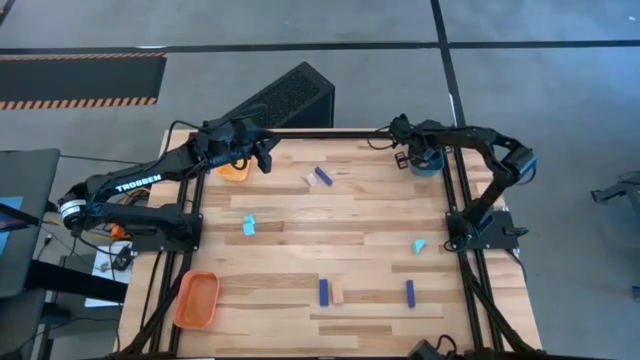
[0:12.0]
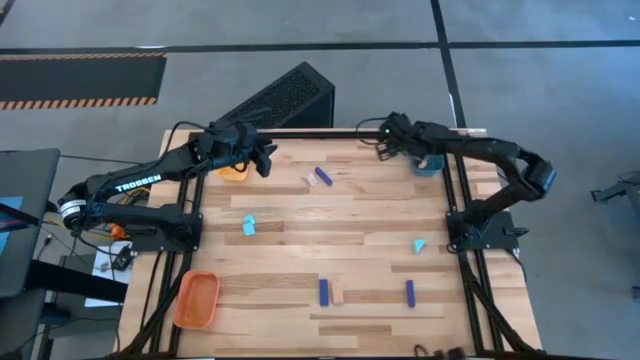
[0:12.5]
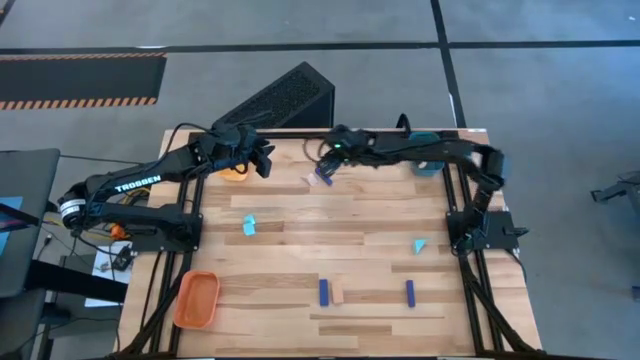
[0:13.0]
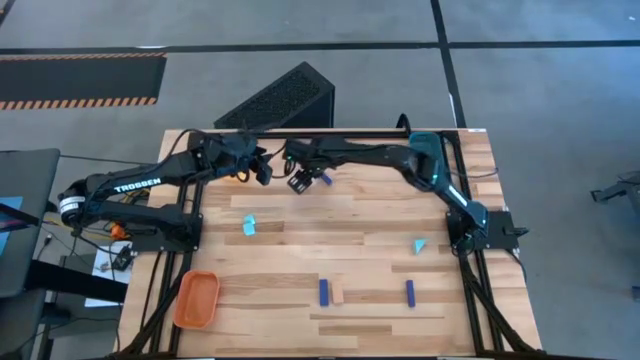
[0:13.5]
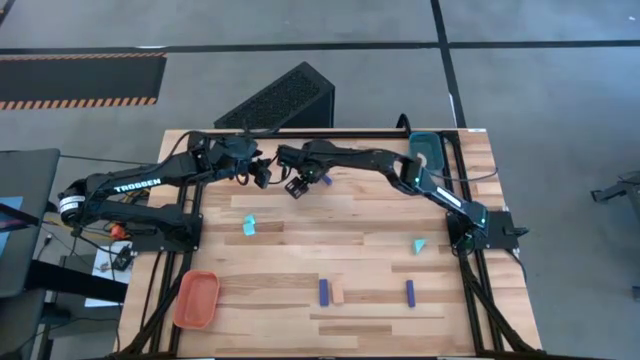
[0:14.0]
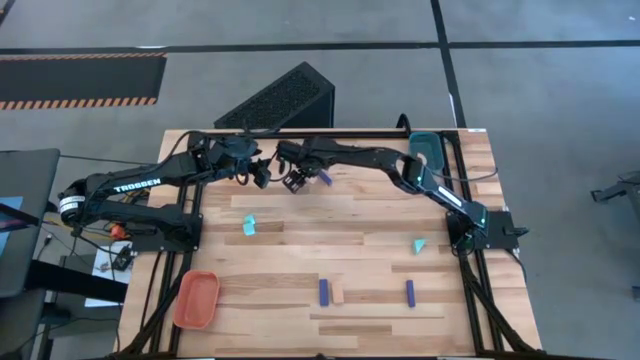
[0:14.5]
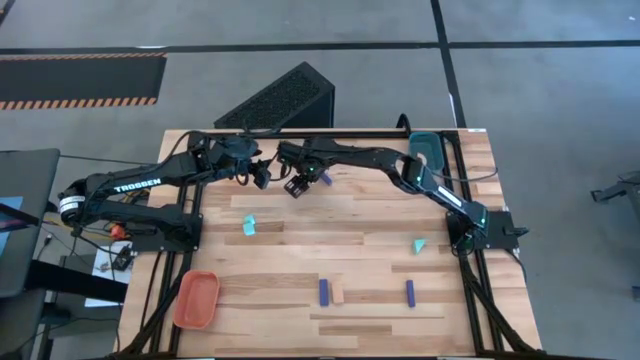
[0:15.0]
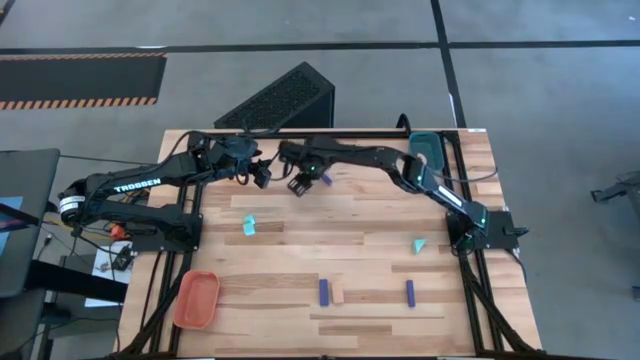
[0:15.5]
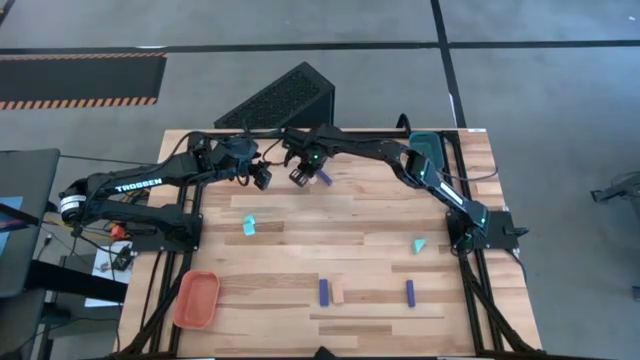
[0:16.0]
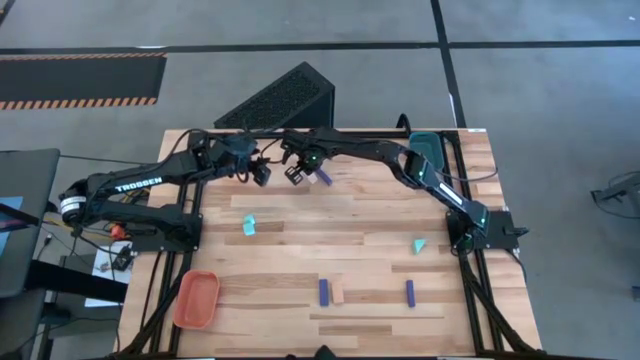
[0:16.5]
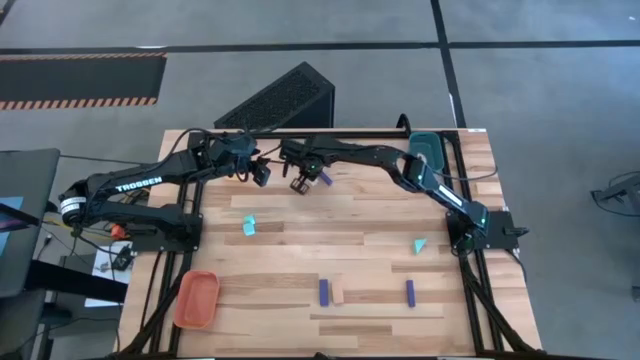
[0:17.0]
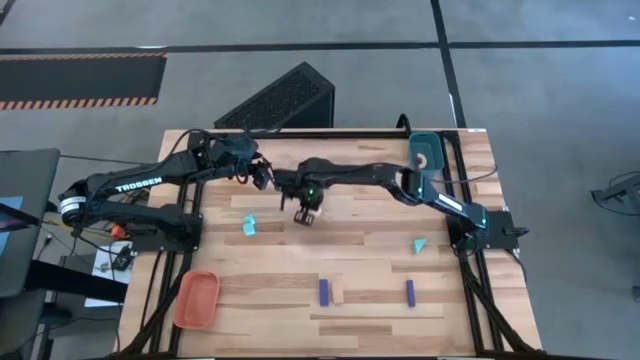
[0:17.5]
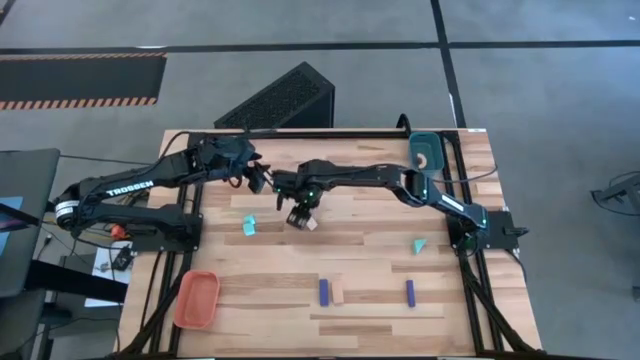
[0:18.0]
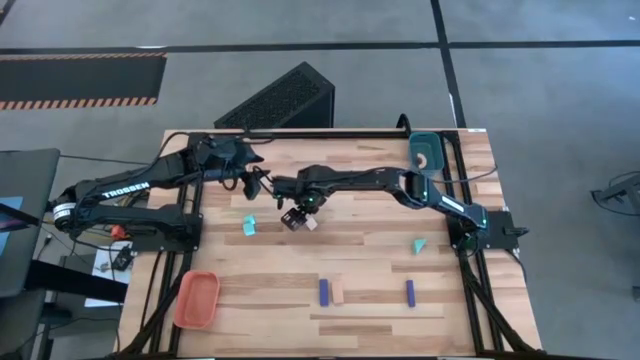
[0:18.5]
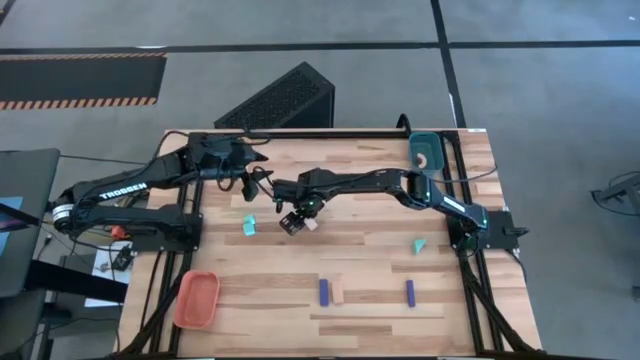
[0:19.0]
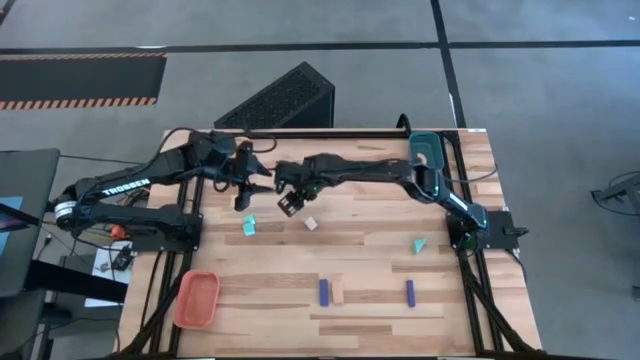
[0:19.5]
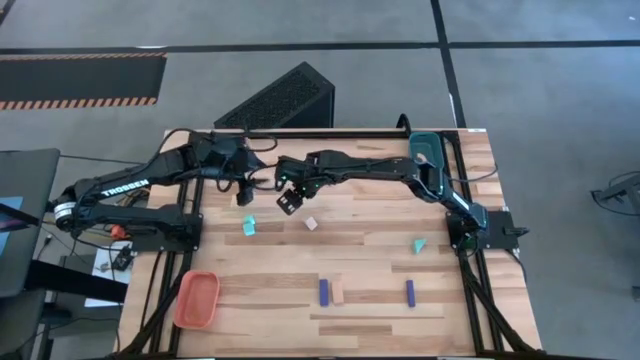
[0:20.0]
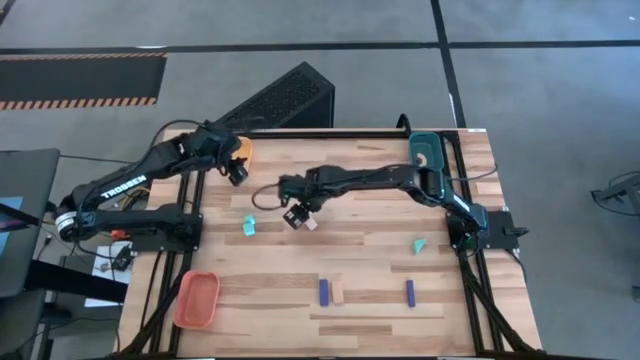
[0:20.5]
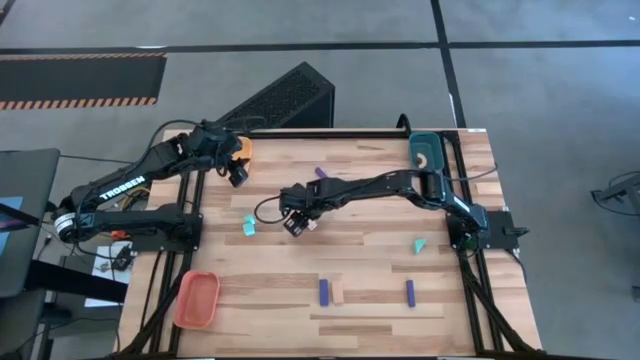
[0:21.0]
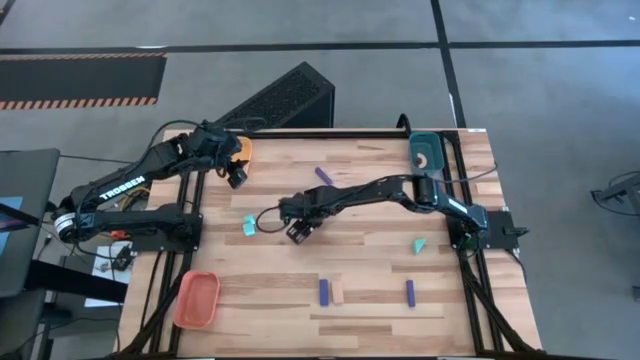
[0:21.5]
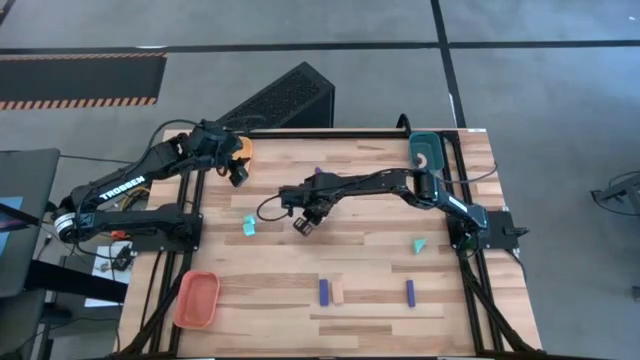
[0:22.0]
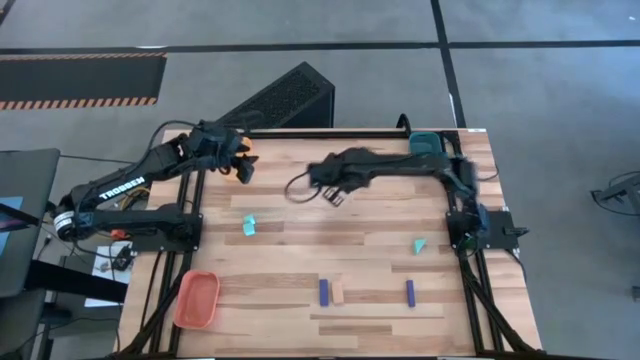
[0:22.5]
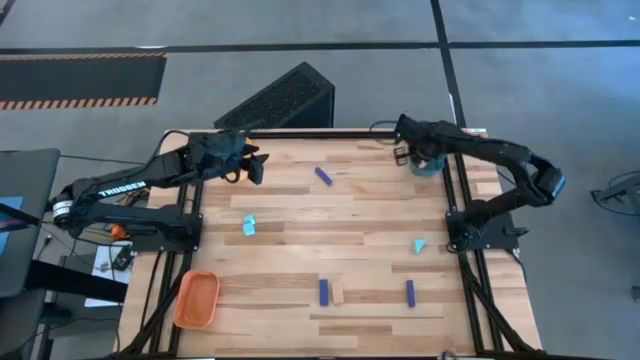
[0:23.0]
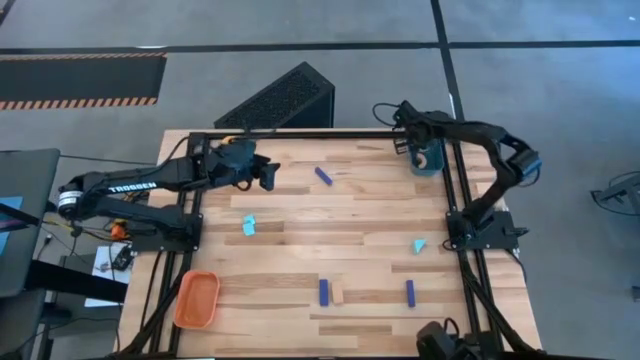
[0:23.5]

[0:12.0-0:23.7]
Task: Sort & place blocks by color
Put the top brown block into the blue bin

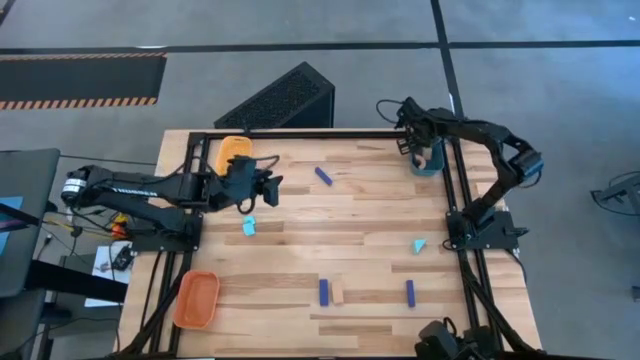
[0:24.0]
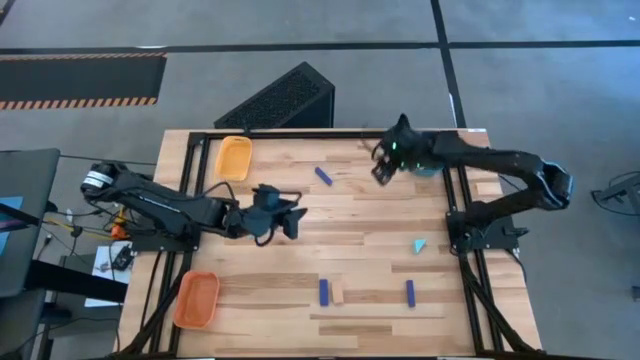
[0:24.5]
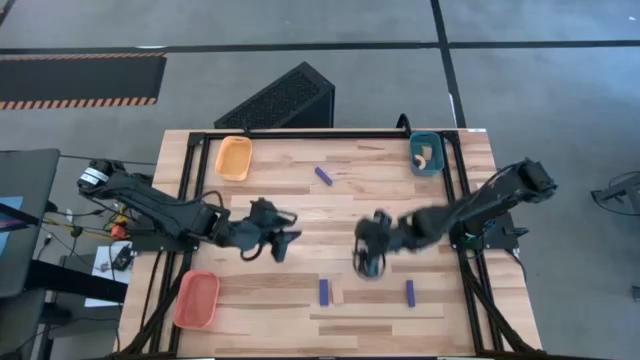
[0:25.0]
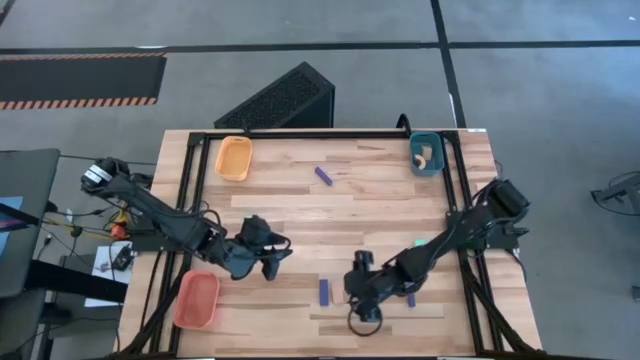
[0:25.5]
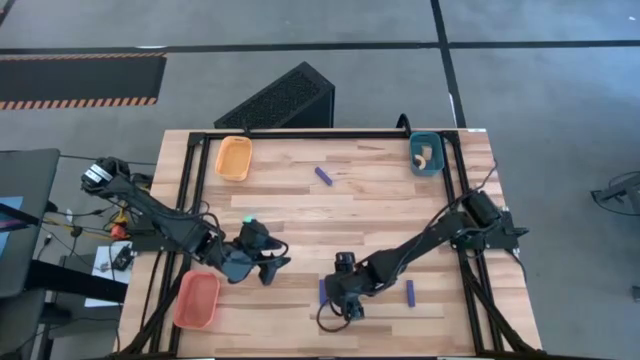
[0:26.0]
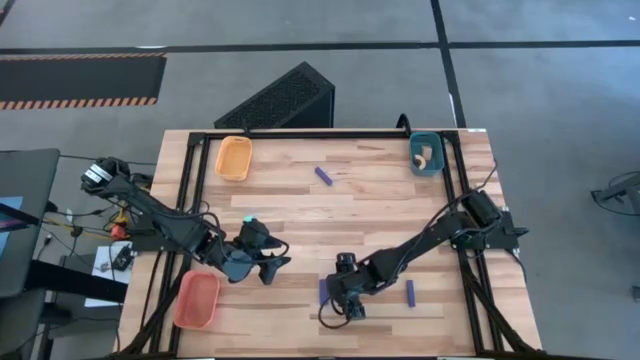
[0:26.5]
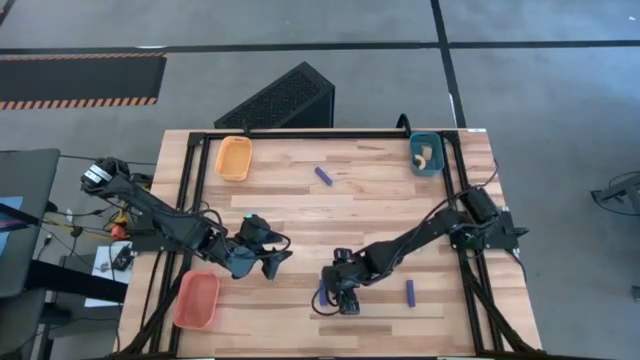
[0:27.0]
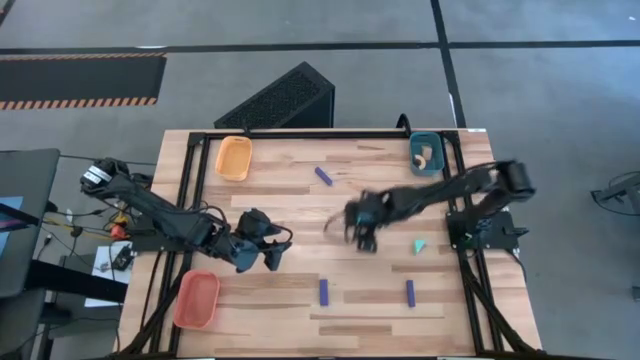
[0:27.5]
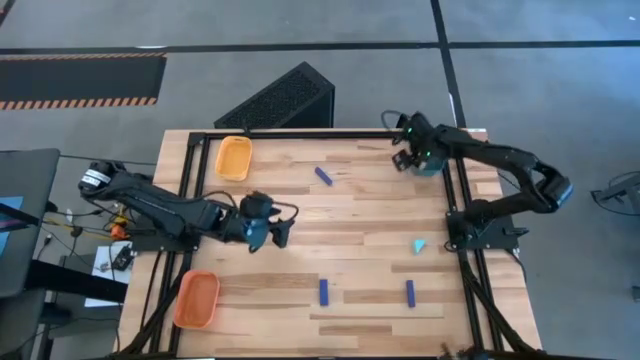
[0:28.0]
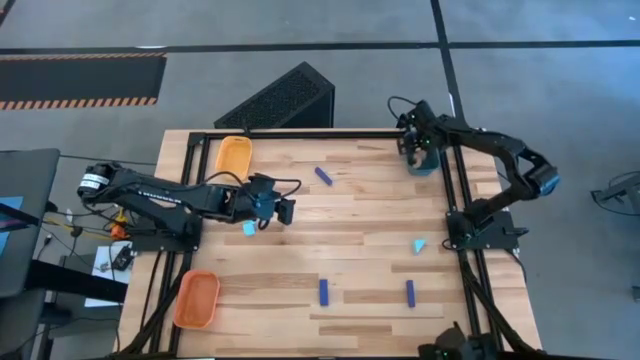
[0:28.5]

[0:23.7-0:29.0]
Put the brown block into the blue bin

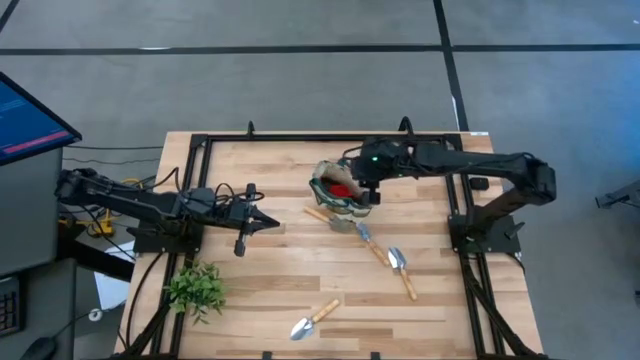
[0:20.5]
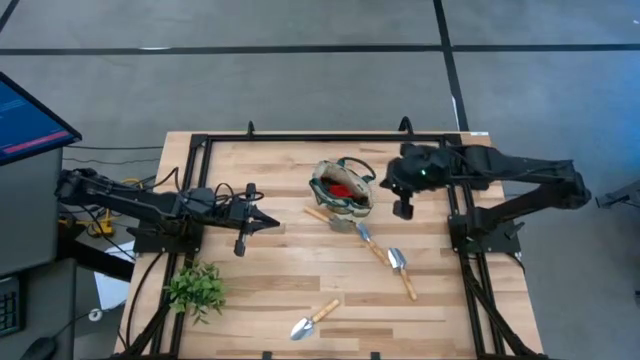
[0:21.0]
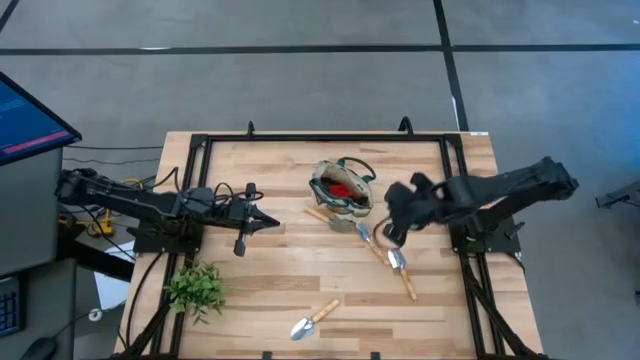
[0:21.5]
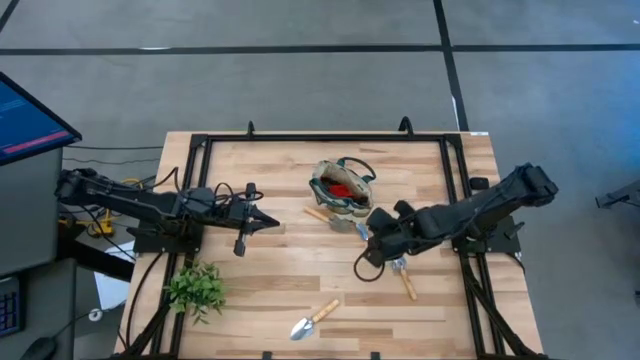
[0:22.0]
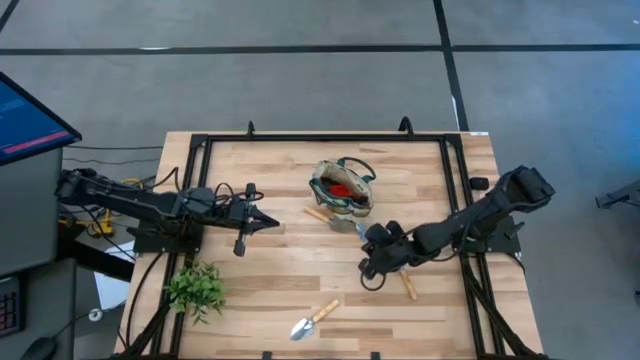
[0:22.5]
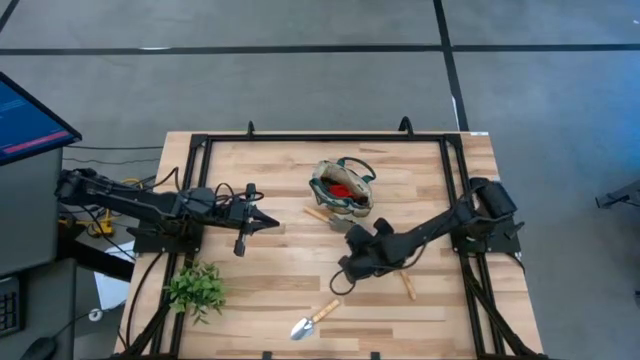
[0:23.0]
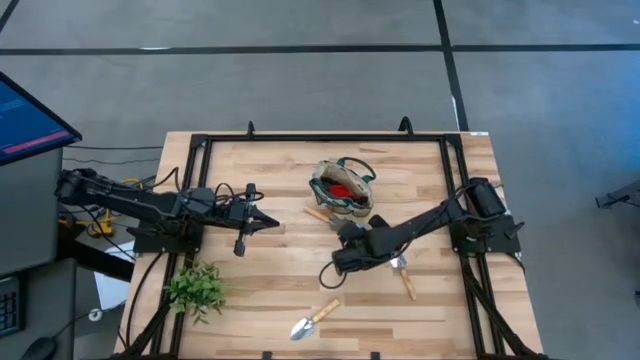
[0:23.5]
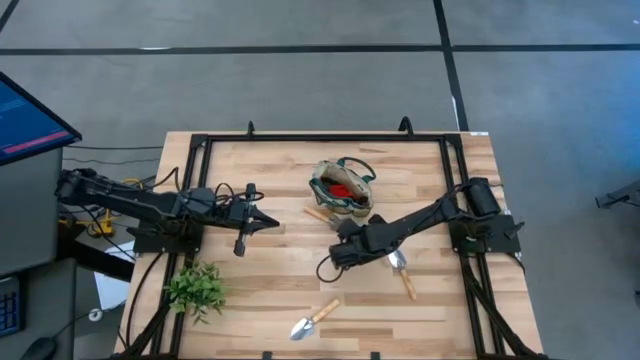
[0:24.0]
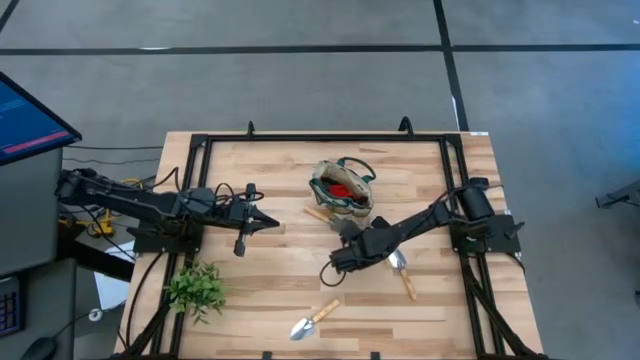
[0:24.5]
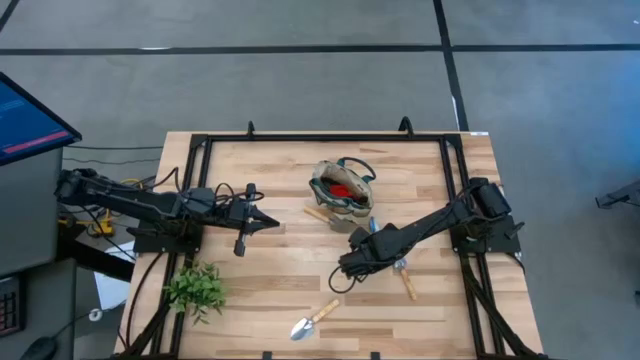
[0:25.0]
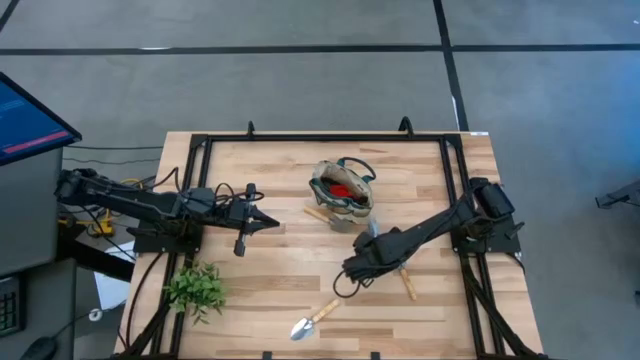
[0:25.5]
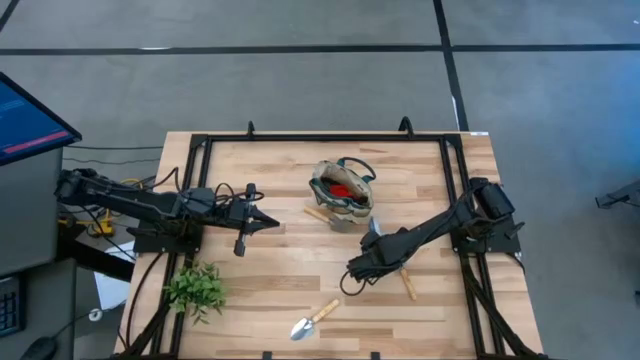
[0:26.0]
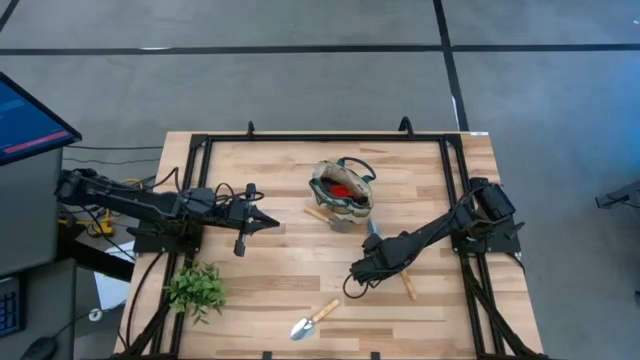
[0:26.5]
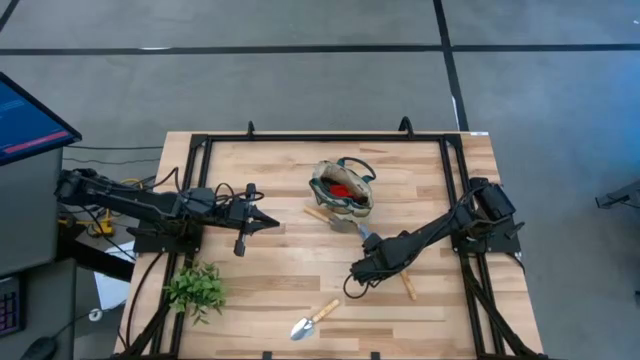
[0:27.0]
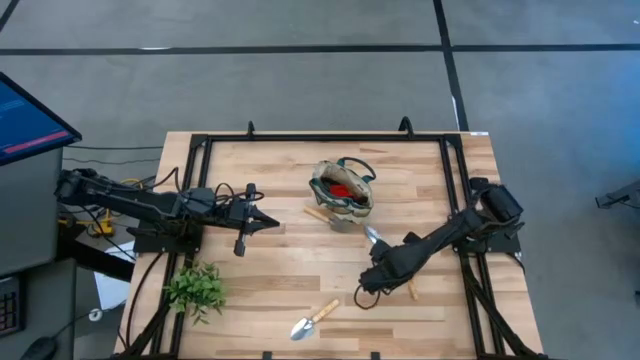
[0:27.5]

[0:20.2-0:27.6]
Task: Pick & Place Garden tools in Gardening bag
Put the brown trowel into the gardening bag
